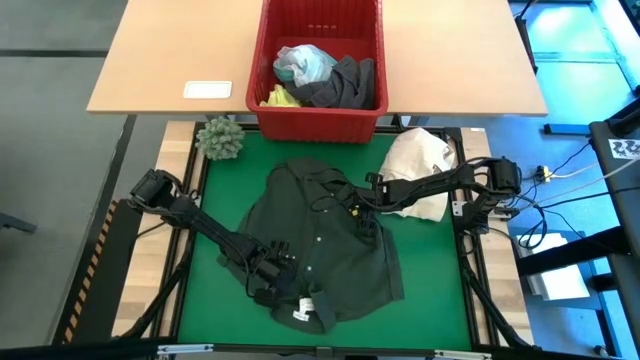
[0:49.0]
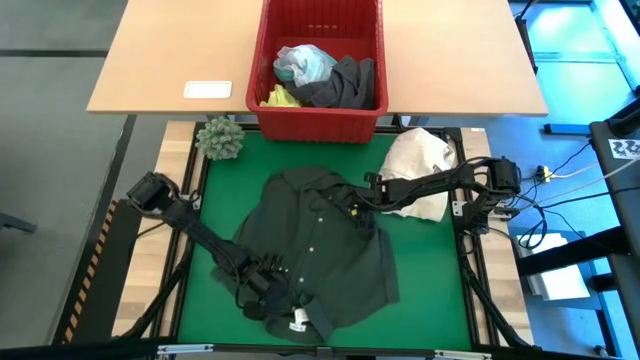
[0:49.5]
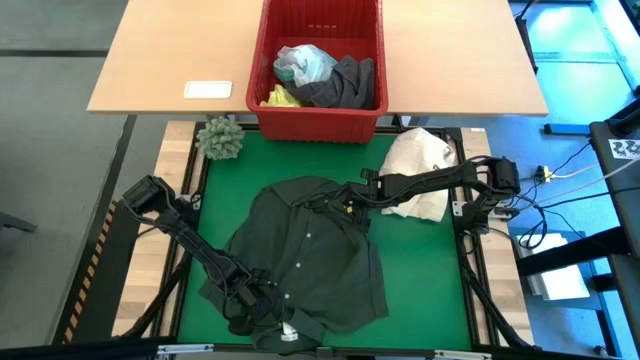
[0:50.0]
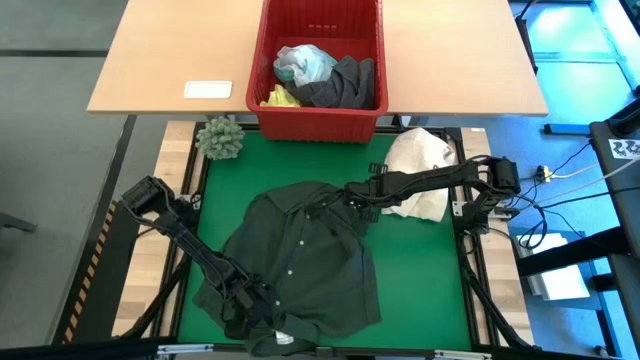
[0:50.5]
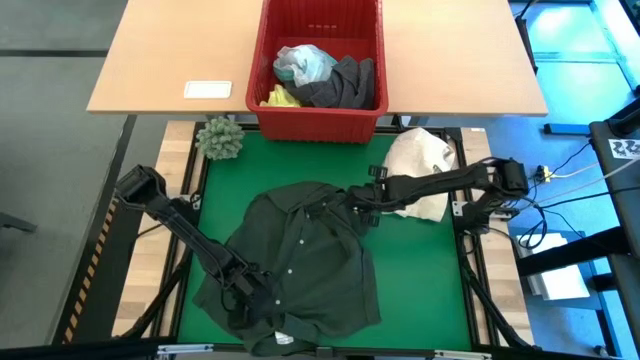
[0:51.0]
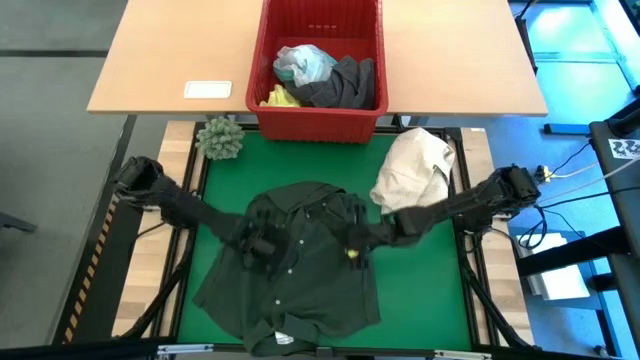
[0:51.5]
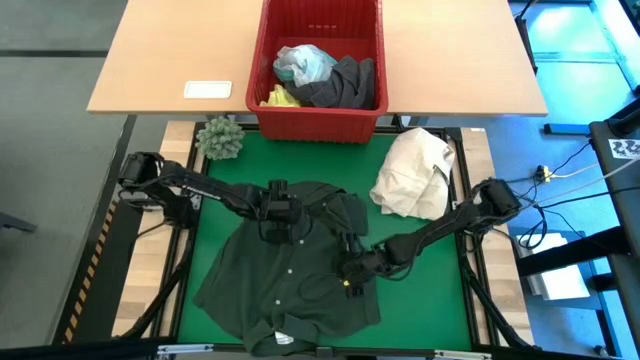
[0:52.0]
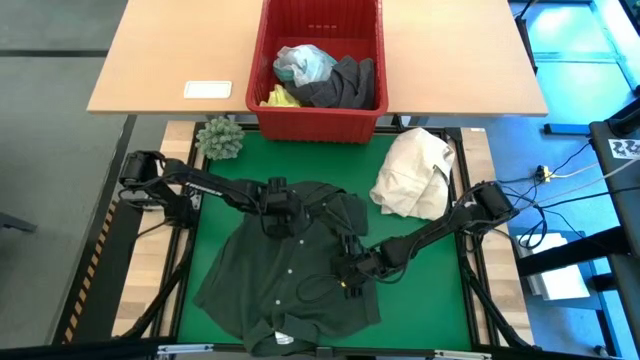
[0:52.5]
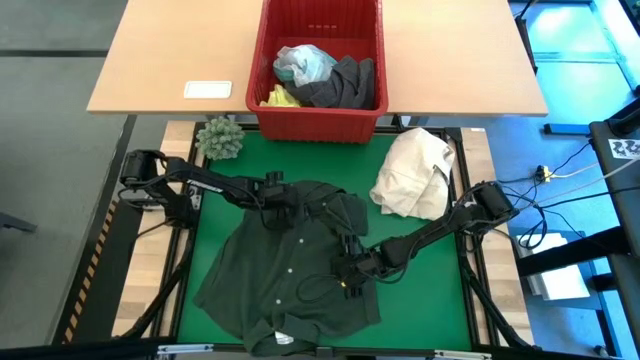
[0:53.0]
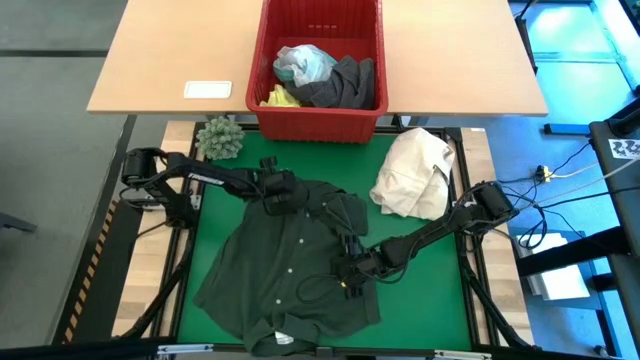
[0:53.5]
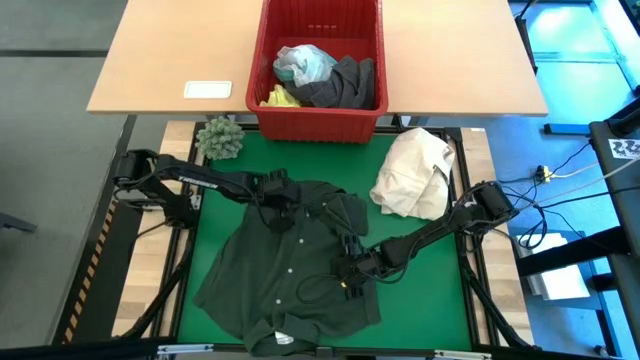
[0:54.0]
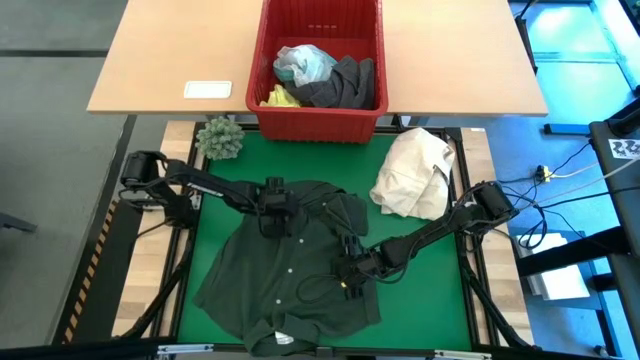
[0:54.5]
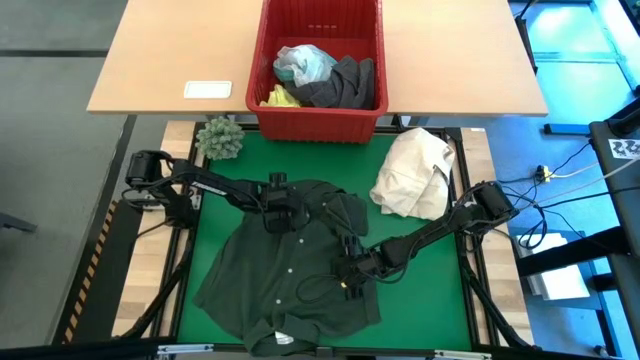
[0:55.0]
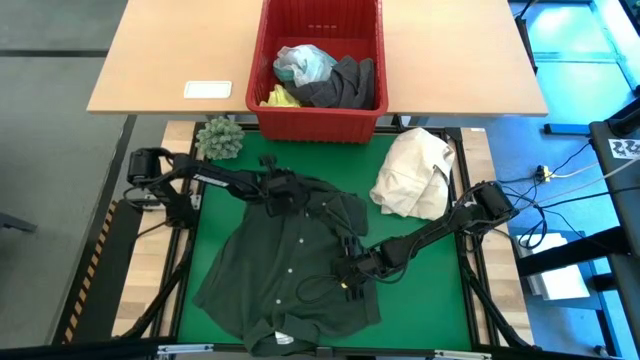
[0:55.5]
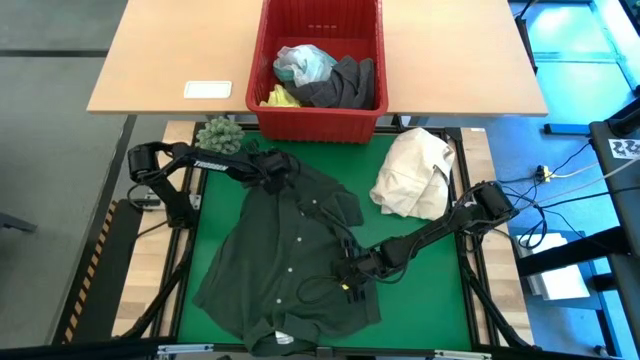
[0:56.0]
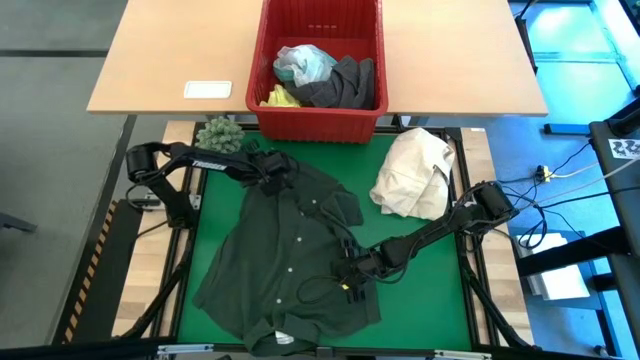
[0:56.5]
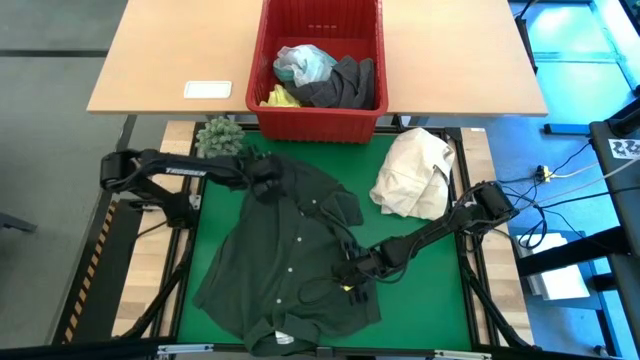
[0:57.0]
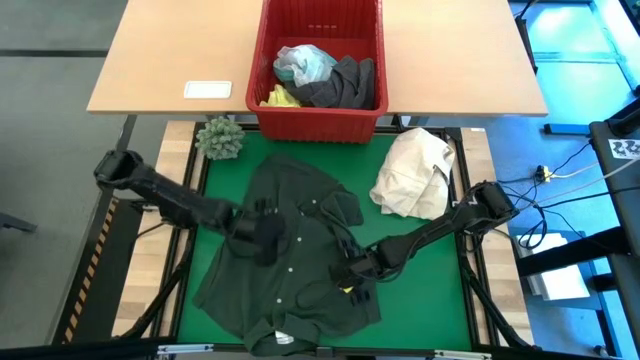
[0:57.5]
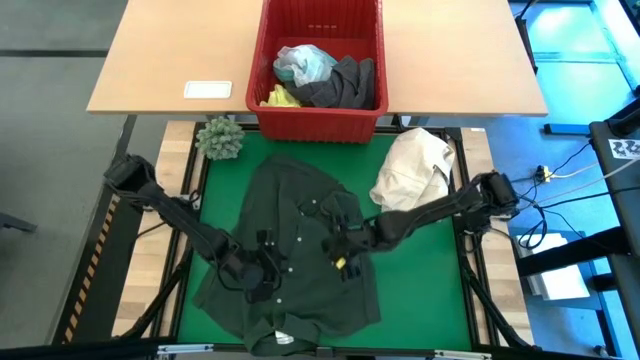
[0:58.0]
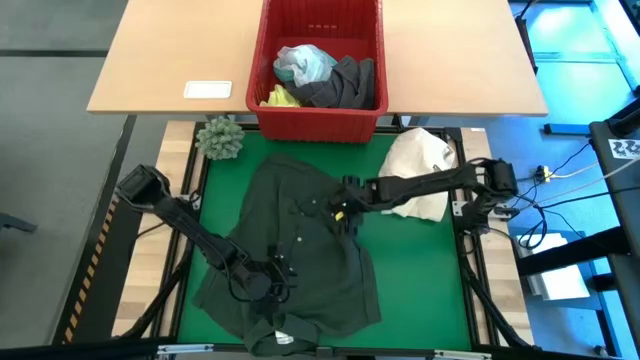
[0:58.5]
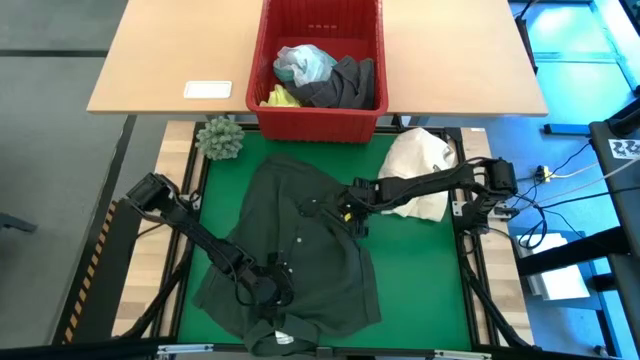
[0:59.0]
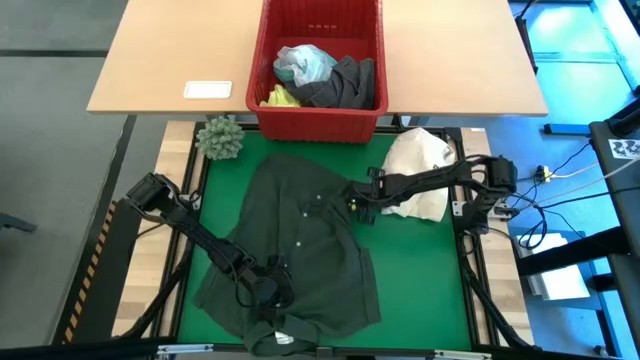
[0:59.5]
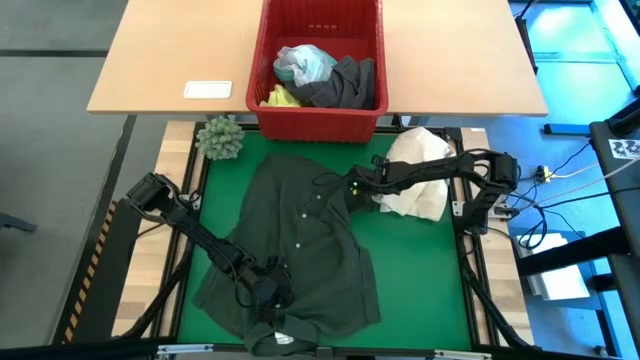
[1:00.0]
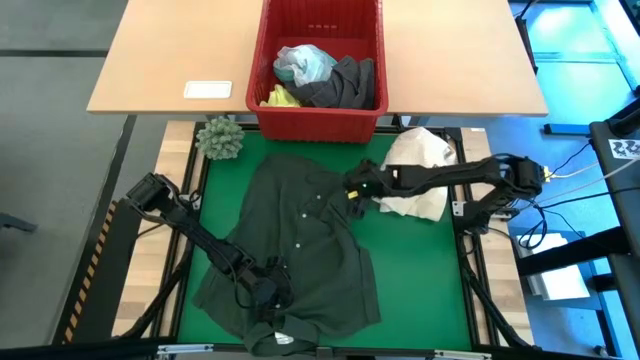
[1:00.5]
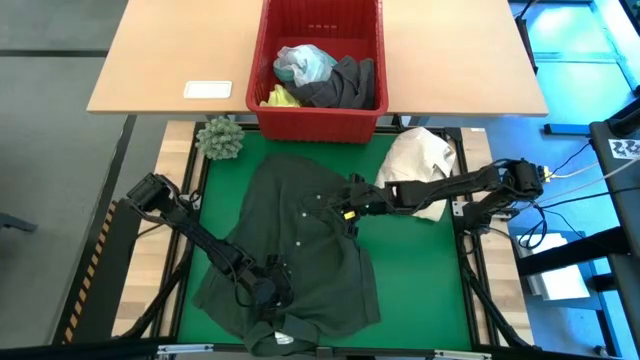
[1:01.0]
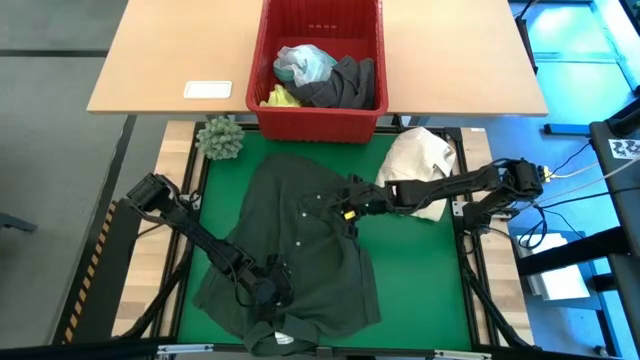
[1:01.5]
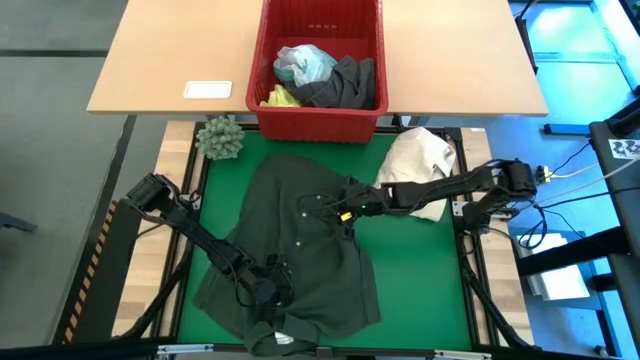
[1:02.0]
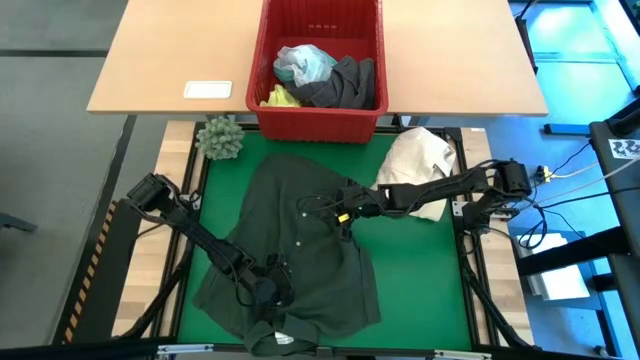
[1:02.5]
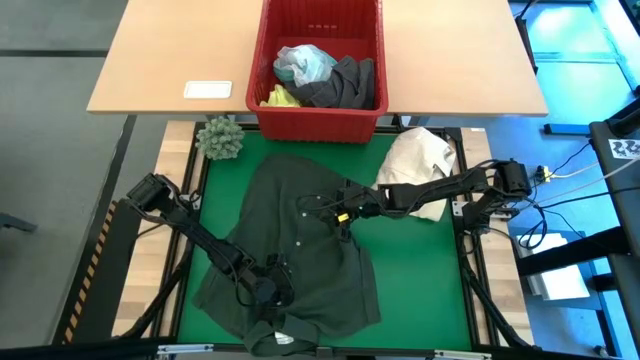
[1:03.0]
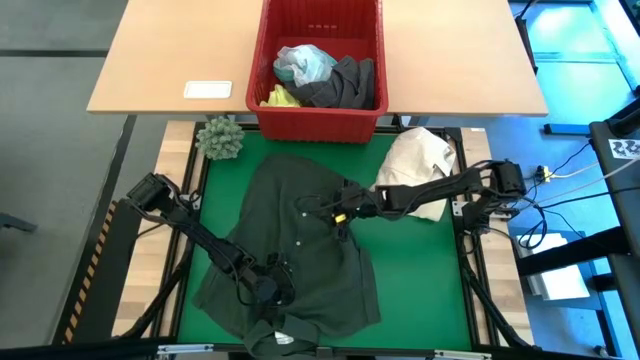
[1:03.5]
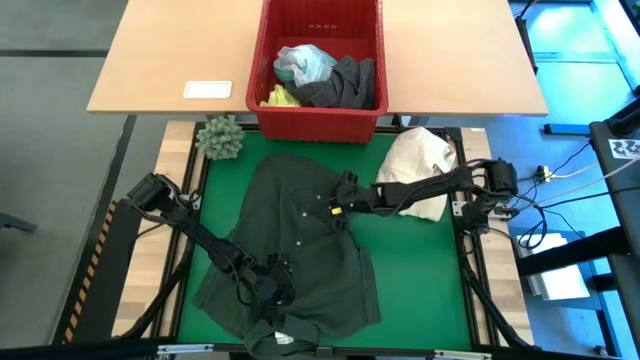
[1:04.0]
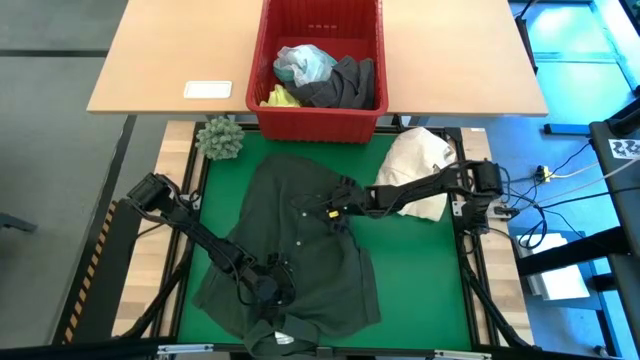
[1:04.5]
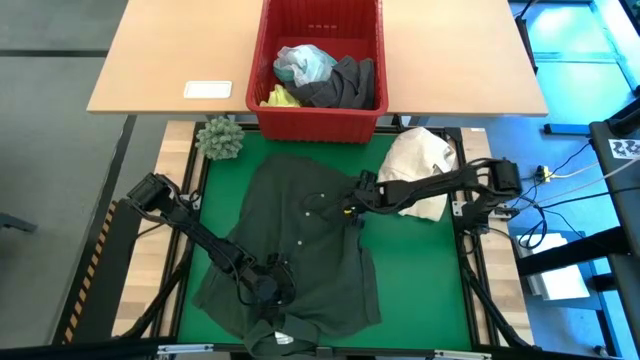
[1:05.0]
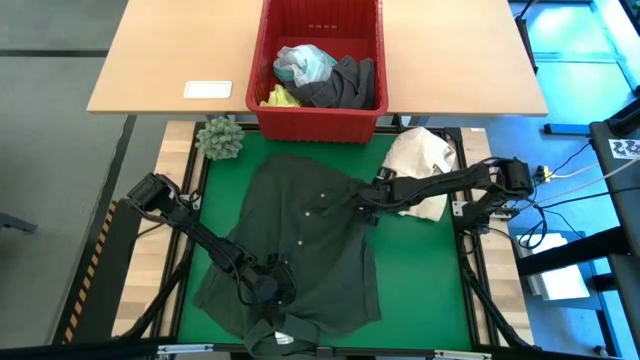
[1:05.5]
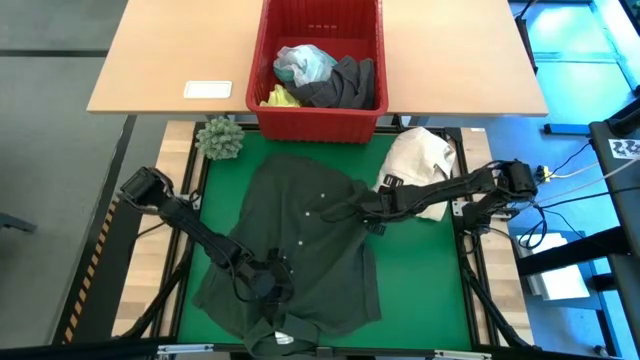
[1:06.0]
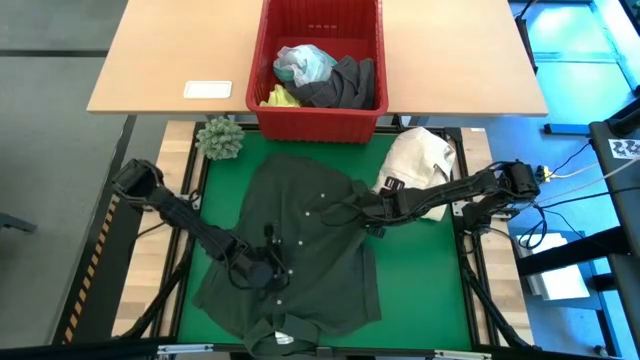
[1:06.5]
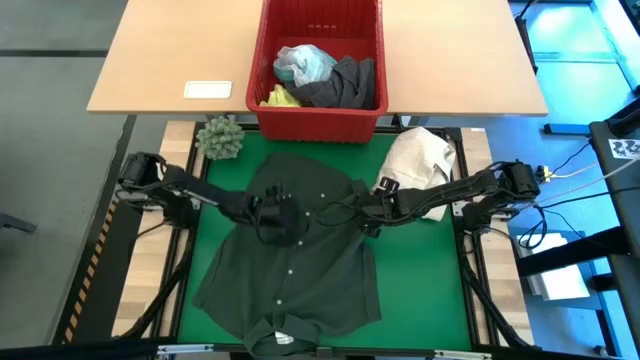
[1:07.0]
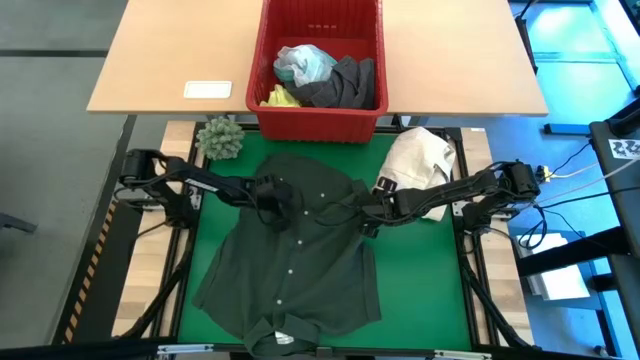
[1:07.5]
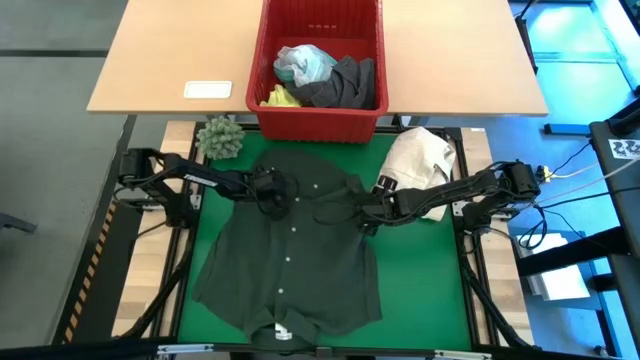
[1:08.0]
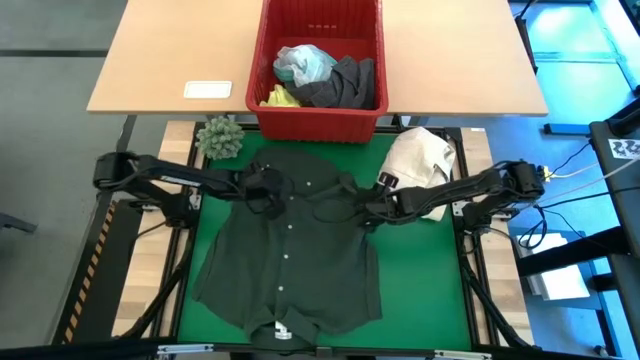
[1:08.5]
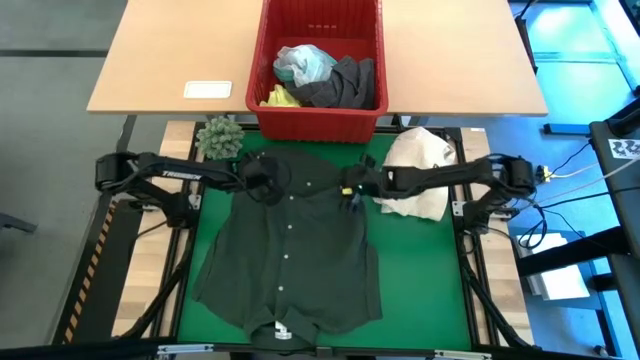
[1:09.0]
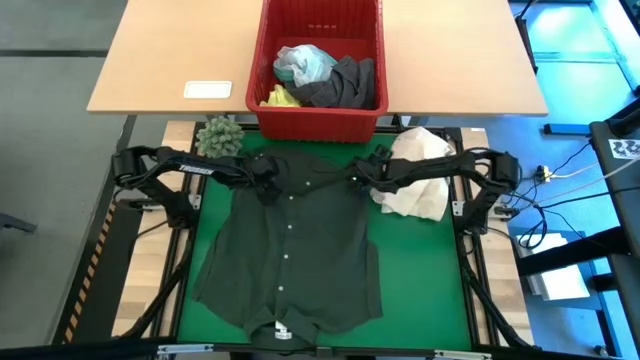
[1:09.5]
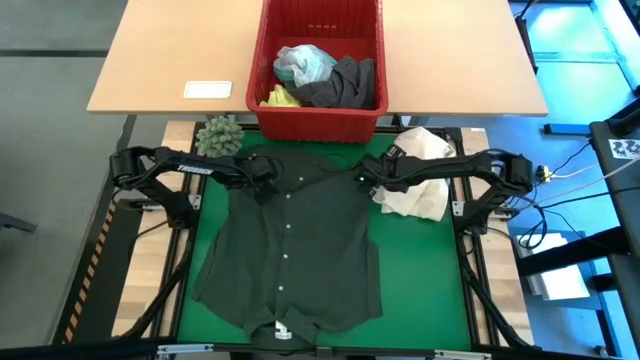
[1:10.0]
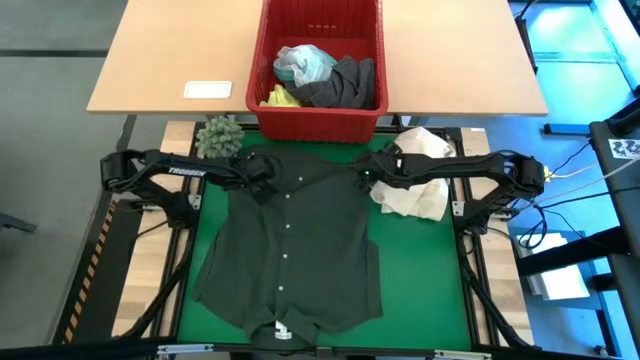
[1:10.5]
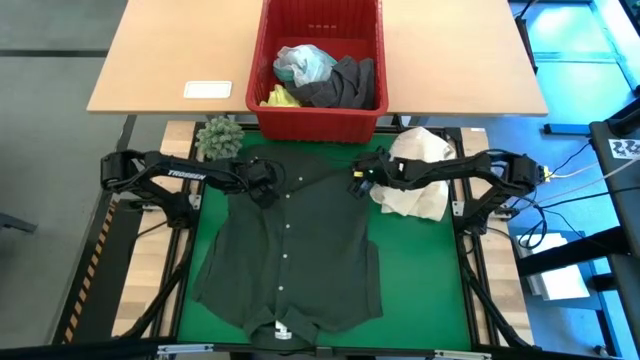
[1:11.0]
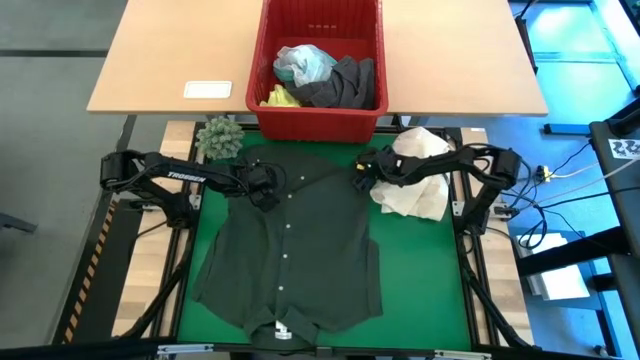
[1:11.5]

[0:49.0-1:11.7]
Task: Fold Laundry from Bin
Fold the dark green polo
